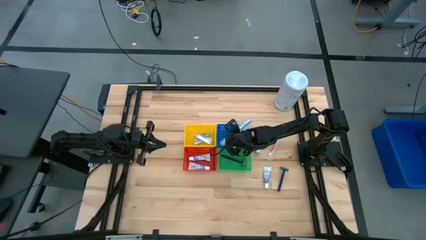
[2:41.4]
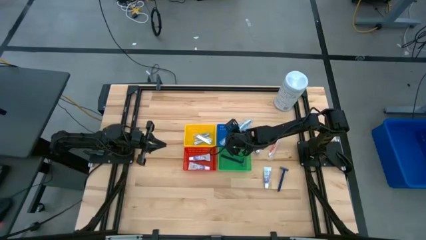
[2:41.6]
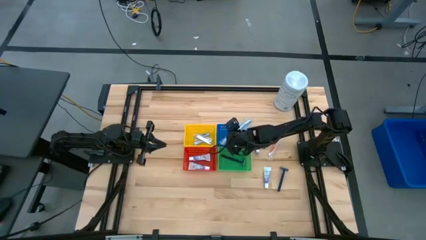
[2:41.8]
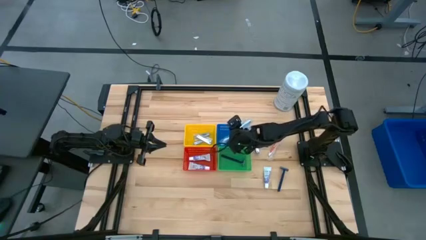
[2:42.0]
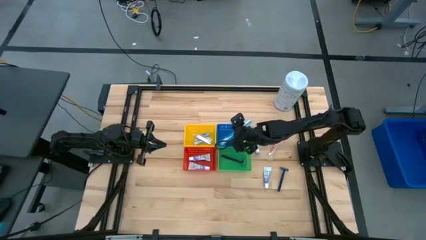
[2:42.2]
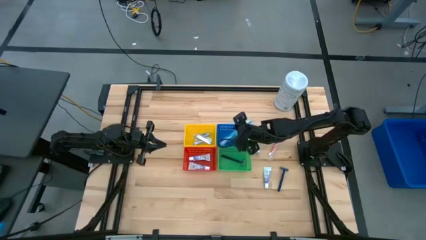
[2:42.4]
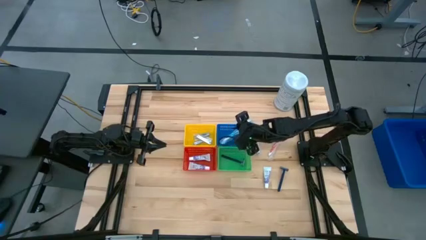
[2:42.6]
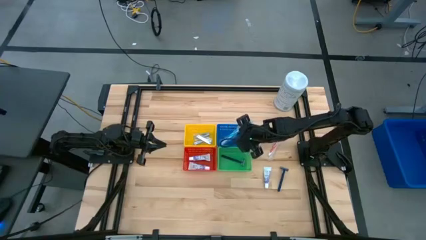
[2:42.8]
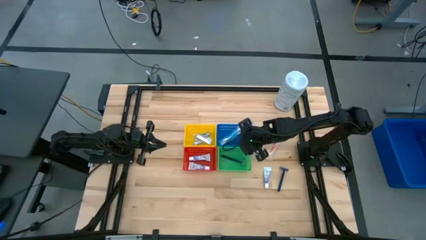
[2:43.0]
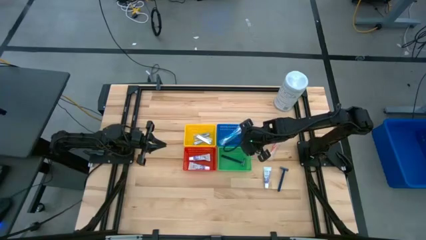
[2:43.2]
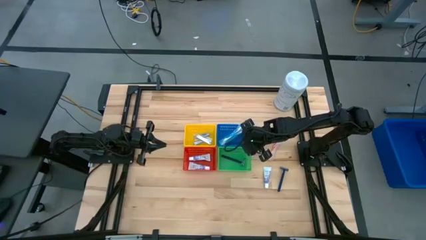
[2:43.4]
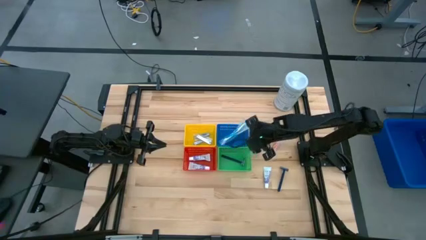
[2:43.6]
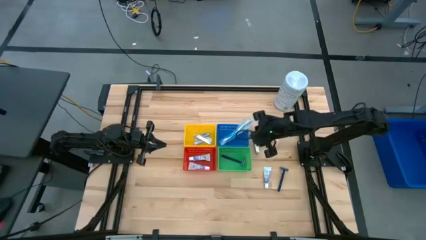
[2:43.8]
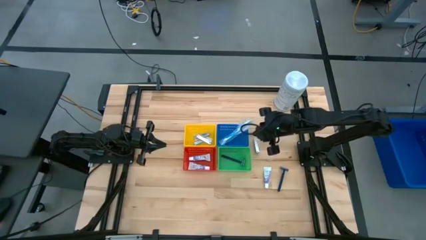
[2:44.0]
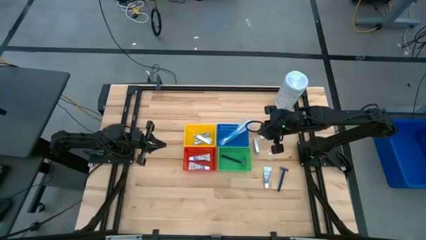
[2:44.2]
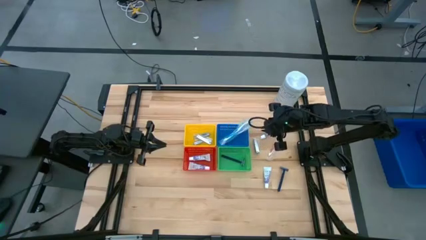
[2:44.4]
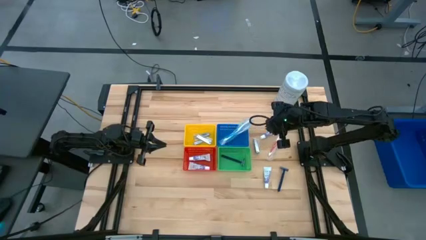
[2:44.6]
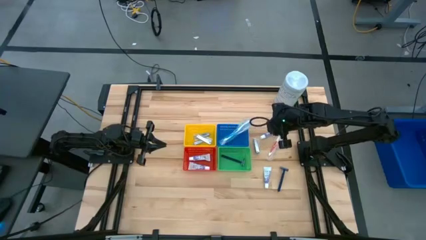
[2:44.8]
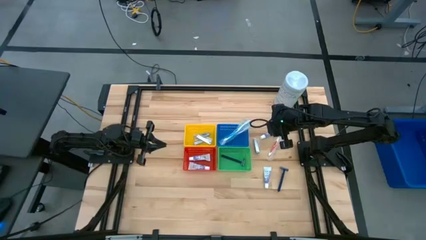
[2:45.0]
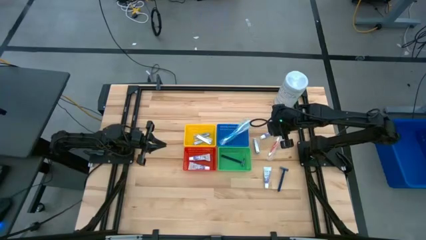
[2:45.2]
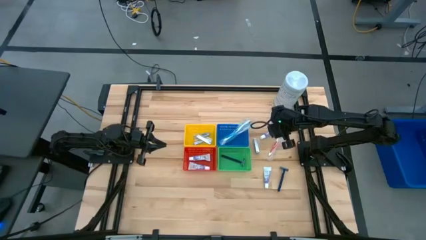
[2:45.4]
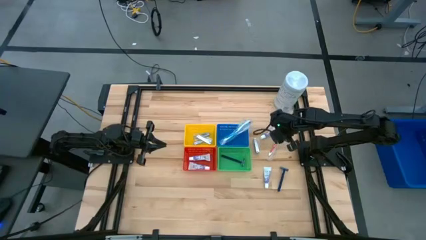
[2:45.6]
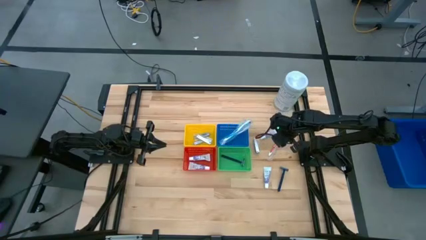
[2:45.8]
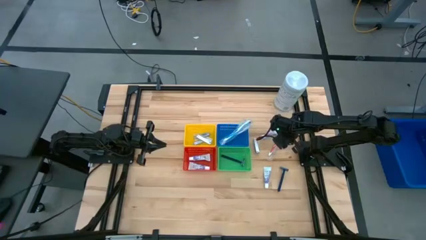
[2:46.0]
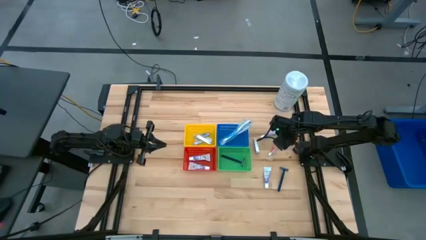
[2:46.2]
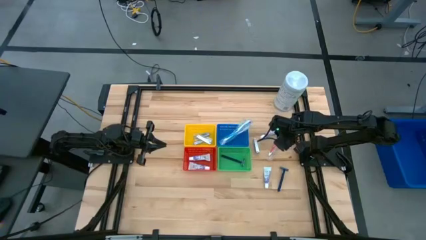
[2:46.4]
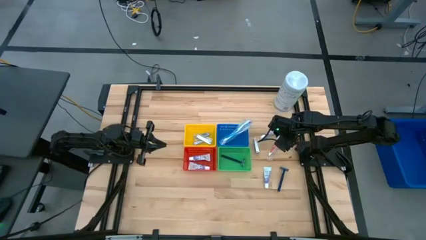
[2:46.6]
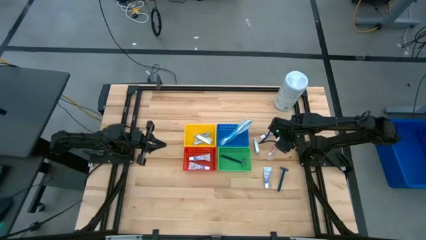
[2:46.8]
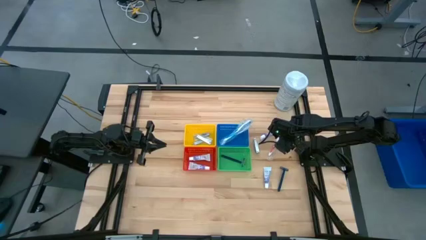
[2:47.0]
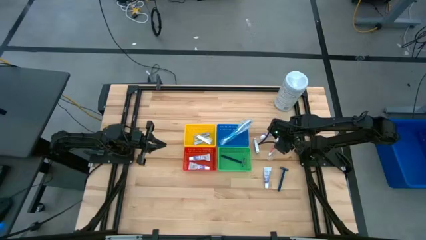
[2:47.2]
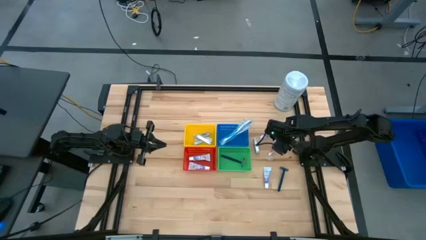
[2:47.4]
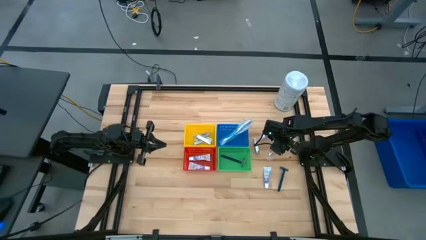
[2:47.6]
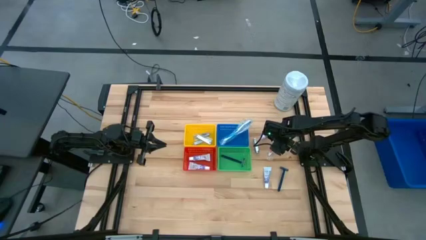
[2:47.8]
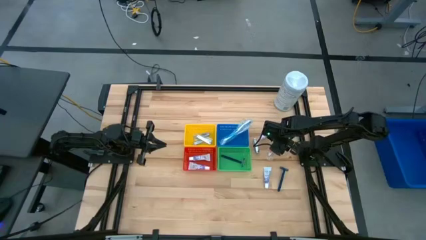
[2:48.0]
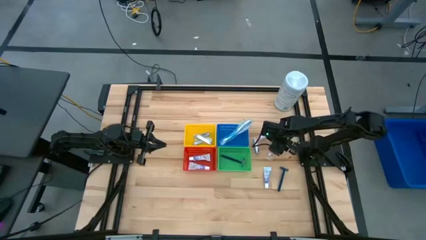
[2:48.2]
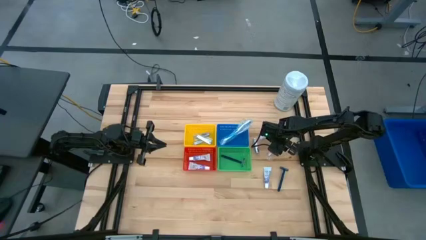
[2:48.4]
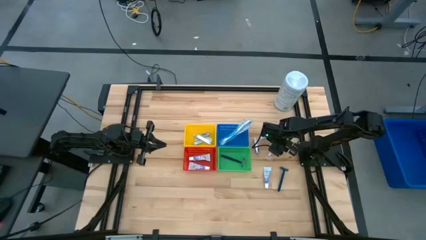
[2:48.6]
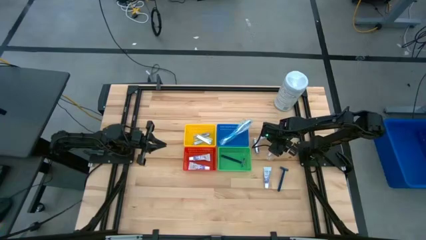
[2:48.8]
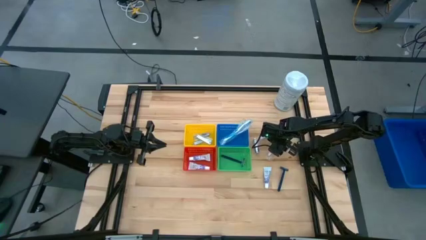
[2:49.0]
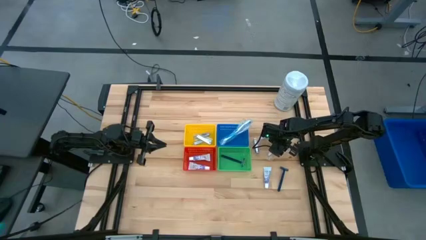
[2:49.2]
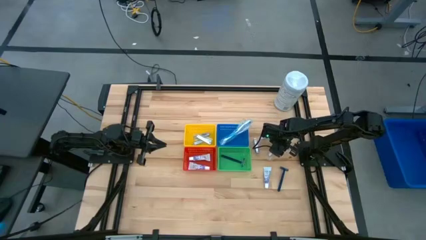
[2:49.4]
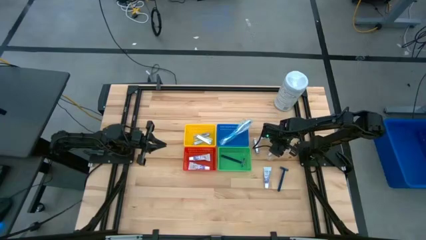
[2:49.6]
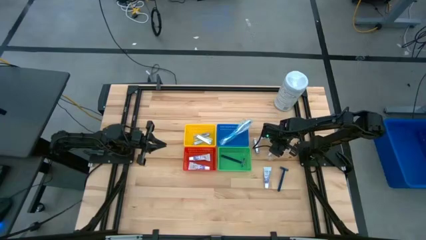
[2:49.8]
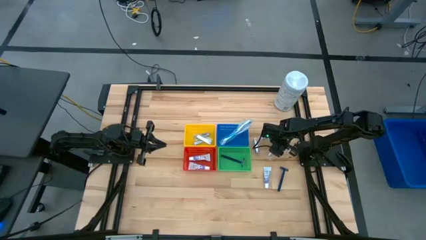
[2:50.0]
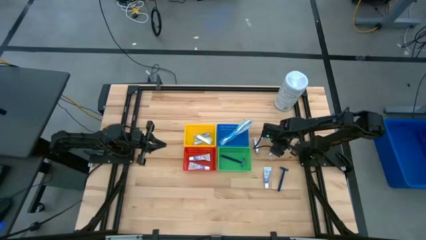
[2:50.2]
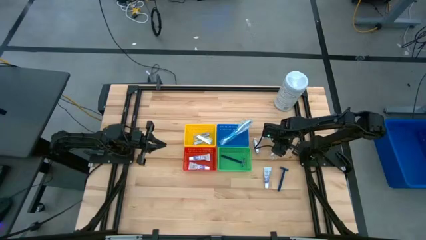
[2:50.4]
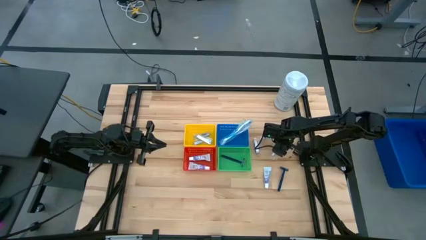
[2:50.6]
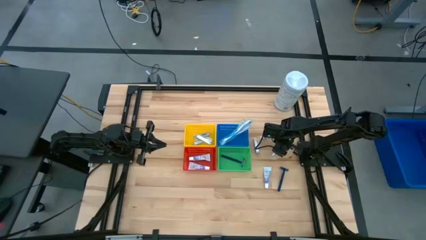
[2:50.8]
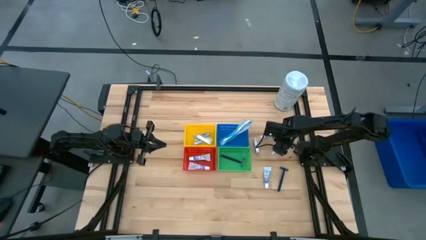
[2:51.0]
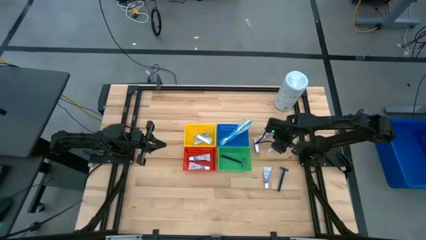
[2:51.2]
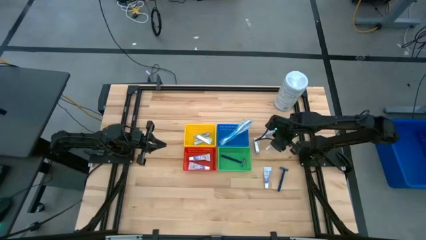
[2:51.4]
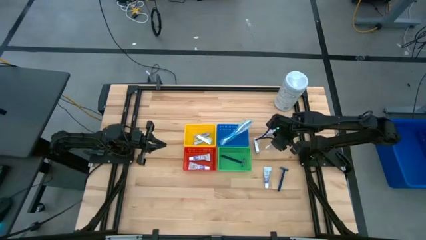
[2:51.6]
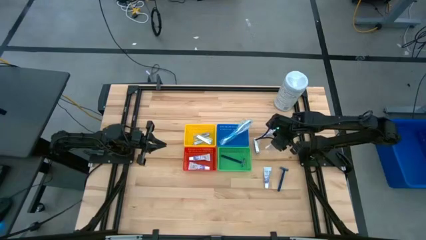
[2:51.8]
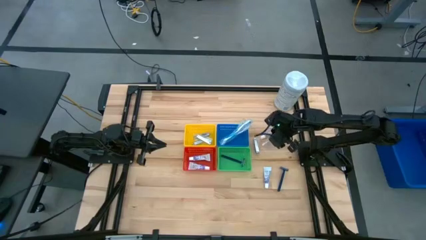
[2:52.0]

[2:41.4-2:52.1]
Task: Pick & Place Travel size toiletries
Put the red toothbrush into the blue bin

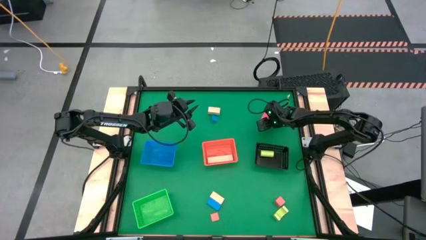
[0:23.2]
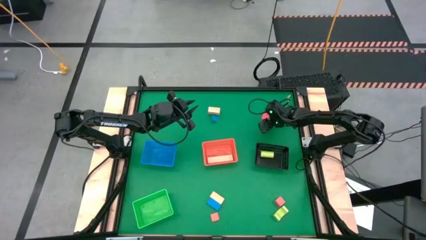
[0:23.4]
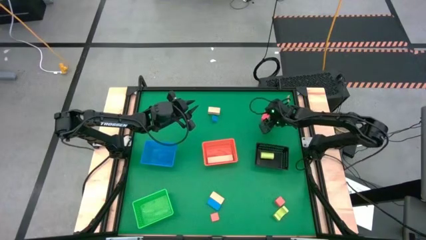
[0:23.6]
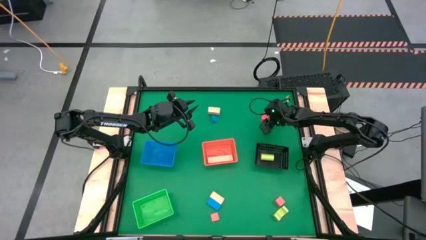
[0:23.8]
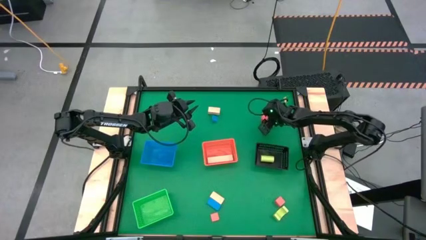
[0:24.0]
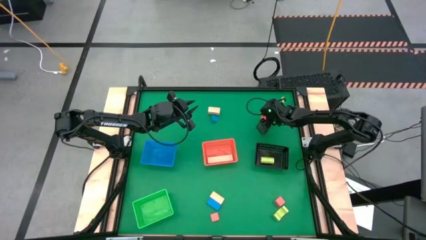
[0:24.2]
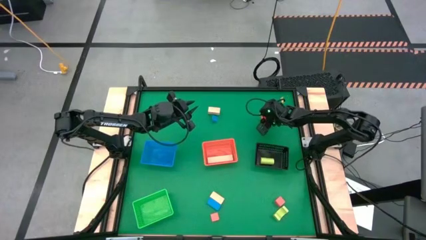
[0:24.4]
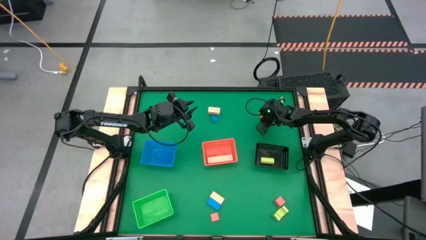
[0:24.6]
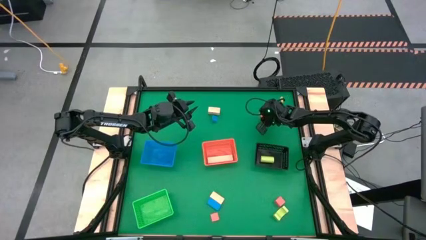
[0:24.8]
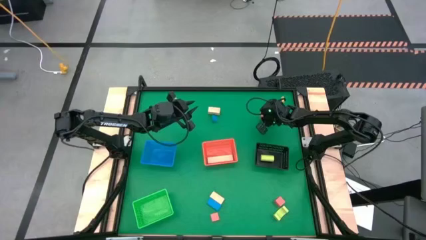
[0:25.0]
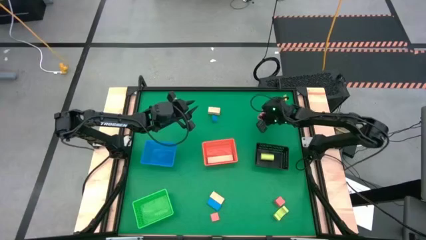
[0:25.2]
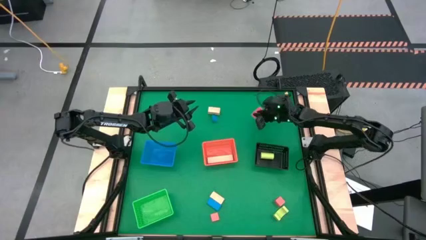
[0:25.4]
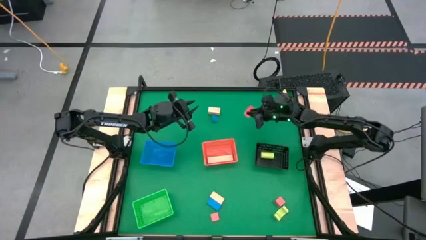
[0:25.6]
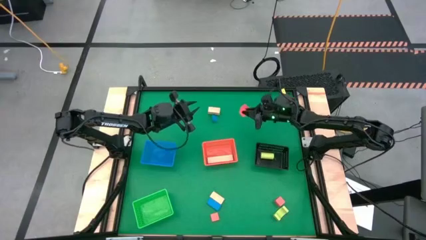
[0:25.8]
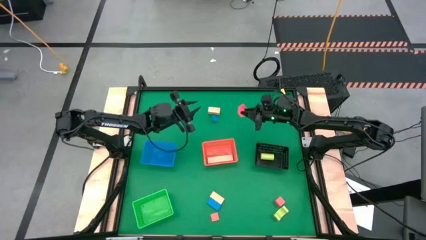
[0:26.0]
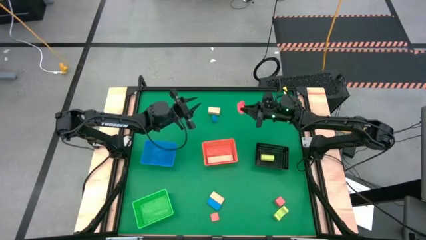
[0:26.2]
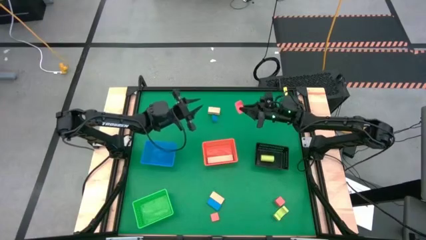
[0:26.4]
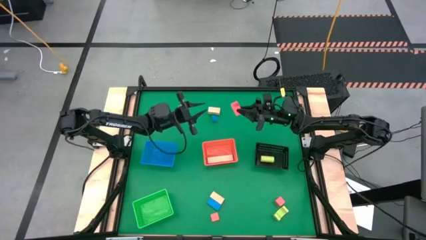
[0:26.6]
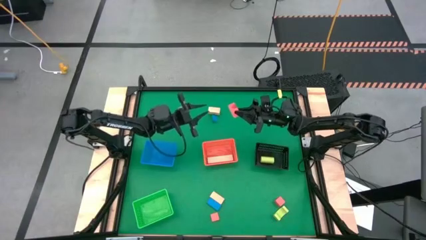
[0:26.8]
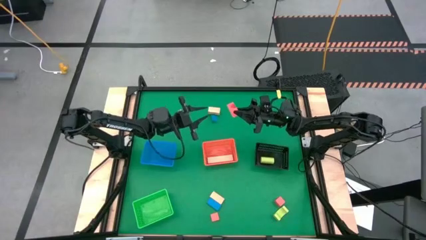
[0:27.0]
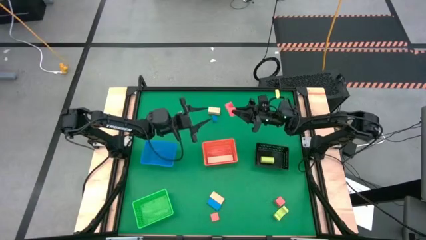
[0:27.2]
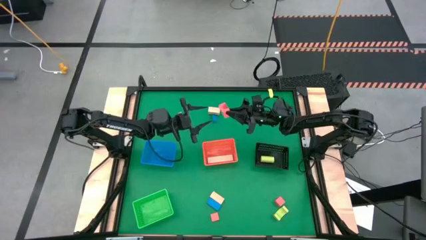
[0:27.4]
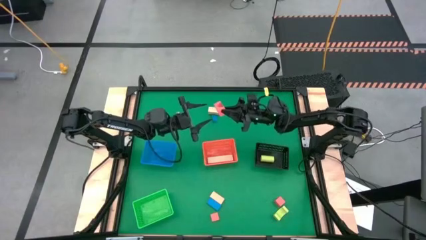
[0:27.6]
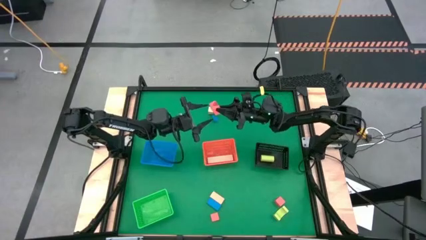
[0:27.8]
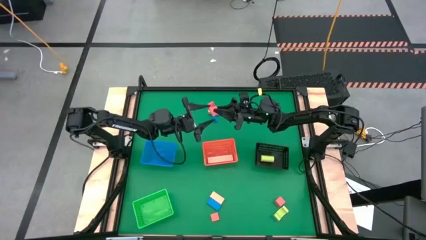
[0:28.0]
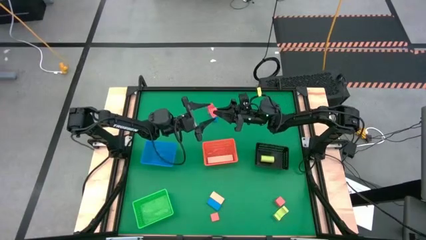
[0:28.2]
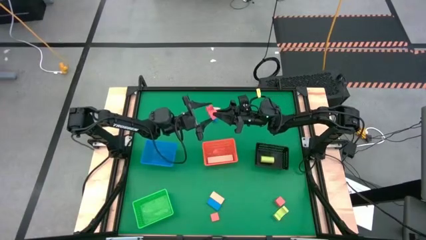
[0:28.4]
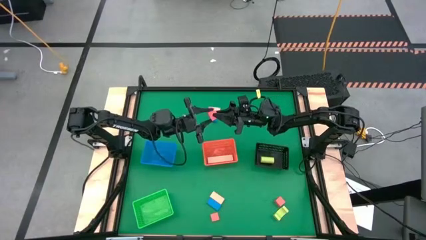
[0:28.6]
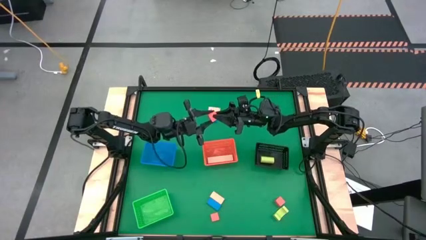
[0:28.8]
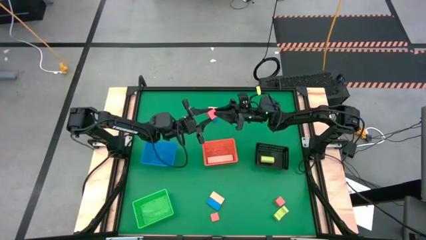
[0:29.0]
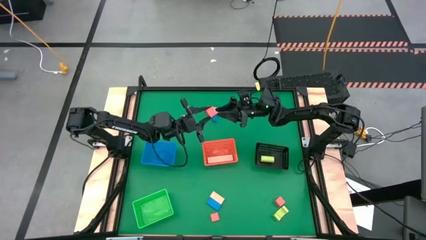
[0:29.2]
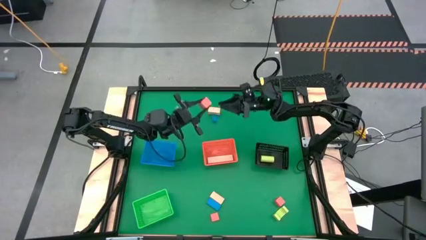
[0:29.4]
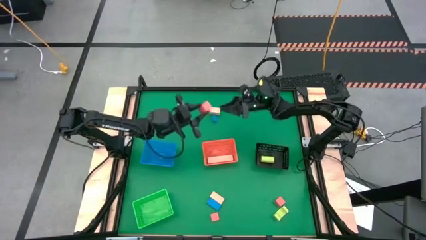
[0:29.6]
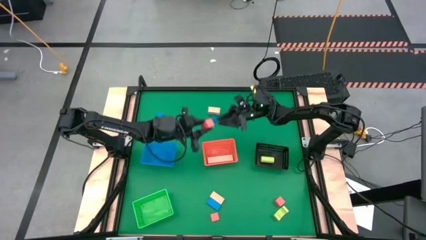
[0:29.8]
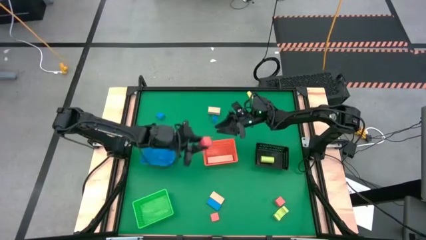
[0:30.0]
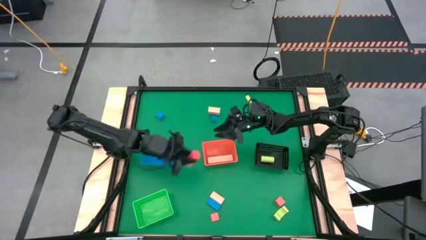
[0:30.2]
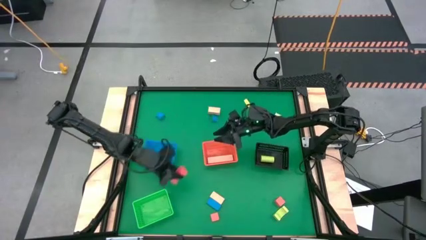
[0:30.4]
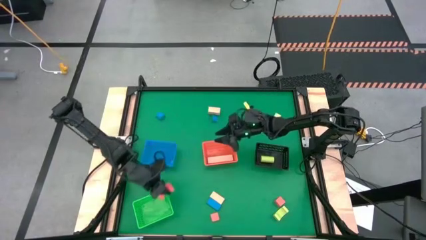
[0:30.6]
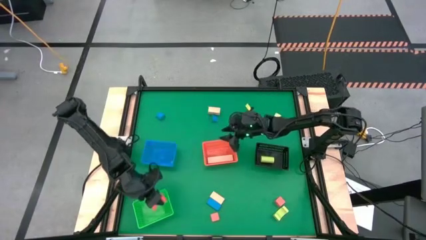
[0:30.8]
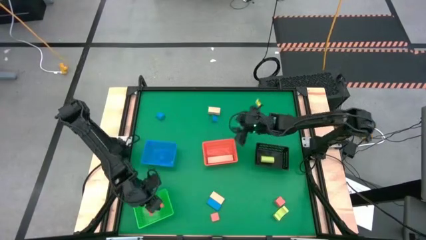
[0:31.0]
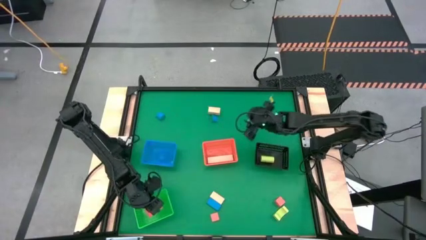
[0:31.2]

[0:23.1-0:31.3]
Task: Sort & place blocks by color
Put the top orange block into the green bin
